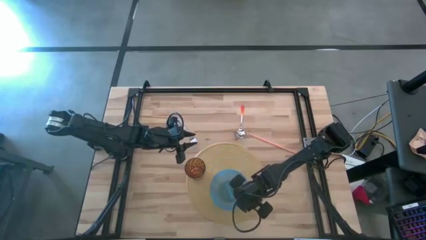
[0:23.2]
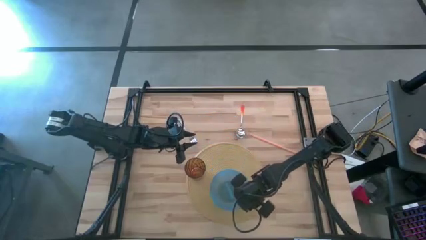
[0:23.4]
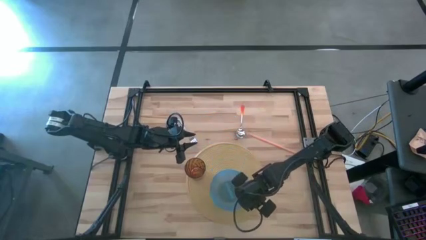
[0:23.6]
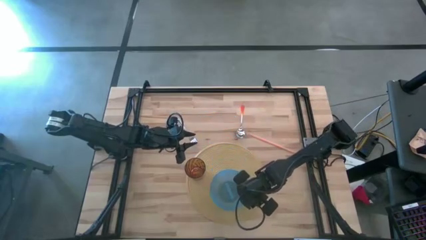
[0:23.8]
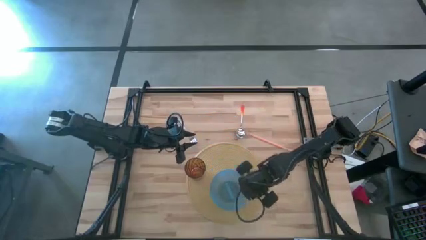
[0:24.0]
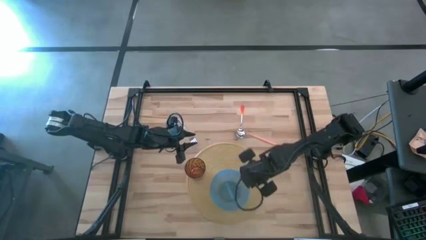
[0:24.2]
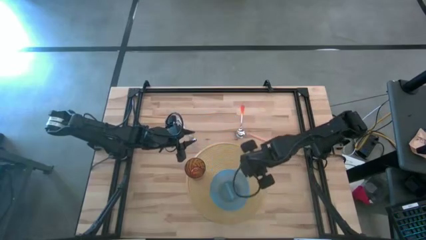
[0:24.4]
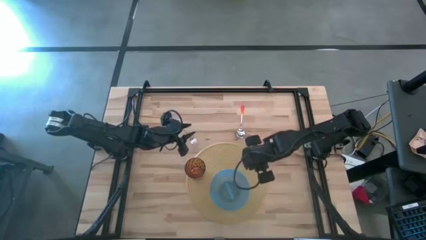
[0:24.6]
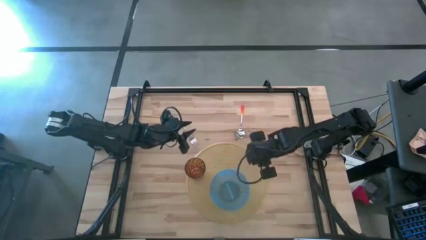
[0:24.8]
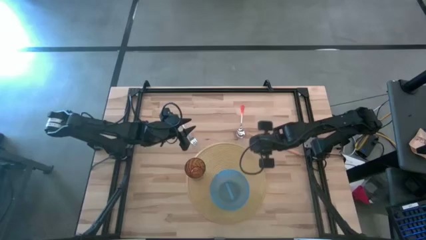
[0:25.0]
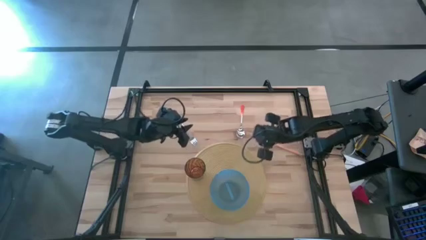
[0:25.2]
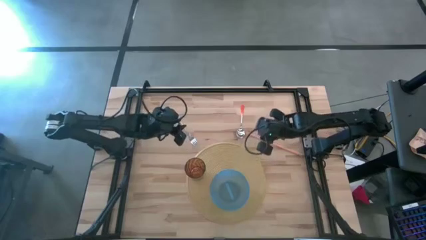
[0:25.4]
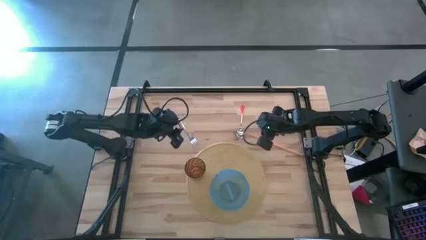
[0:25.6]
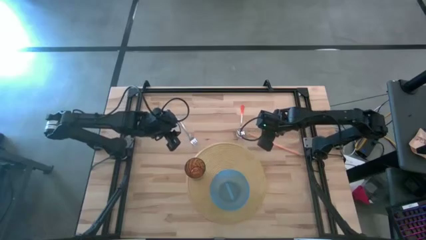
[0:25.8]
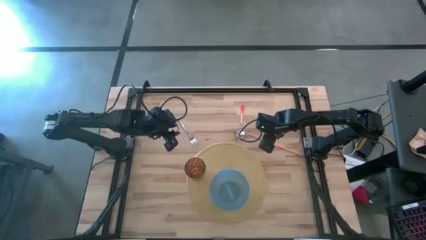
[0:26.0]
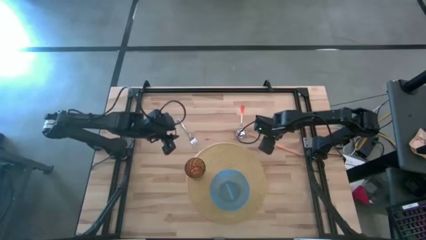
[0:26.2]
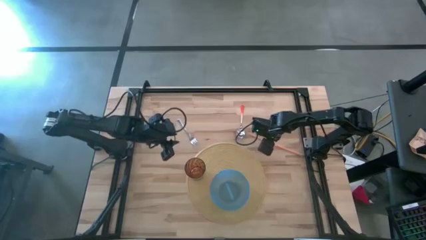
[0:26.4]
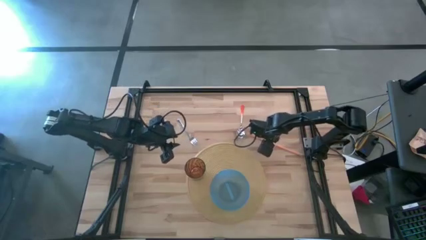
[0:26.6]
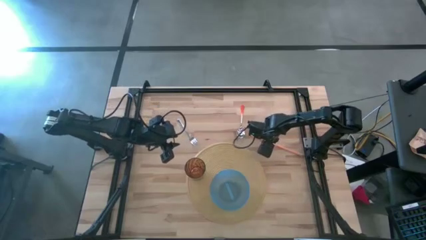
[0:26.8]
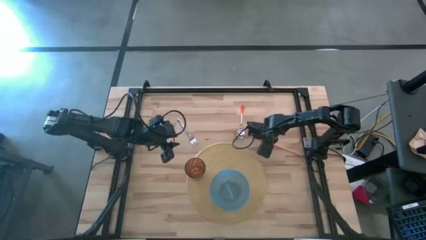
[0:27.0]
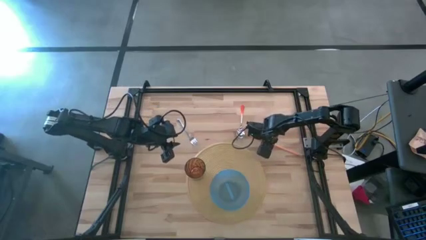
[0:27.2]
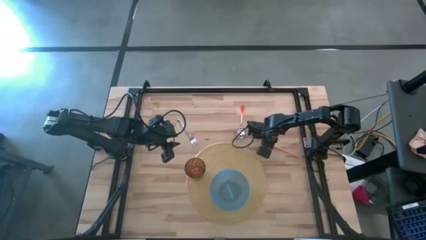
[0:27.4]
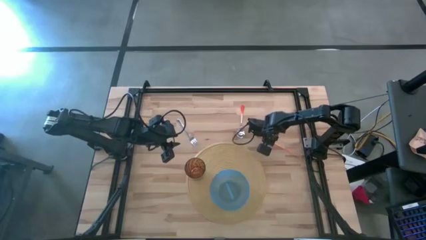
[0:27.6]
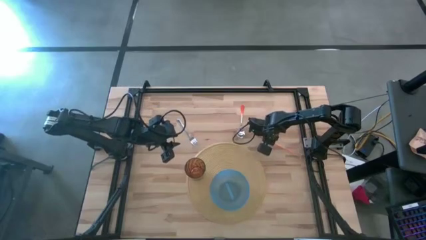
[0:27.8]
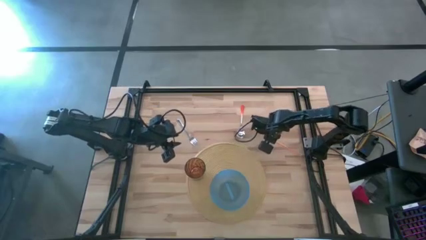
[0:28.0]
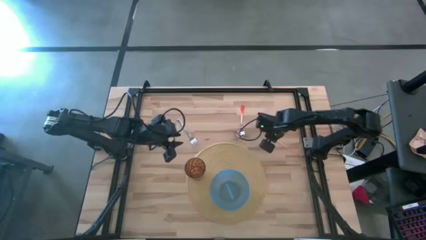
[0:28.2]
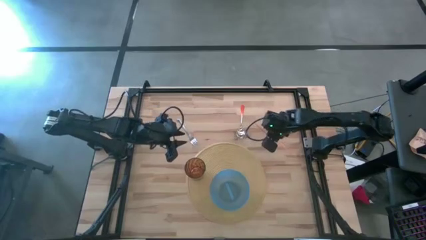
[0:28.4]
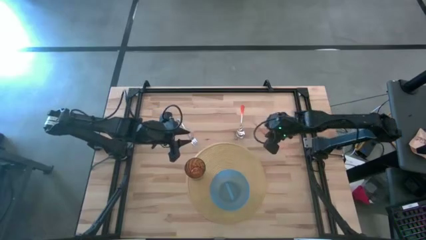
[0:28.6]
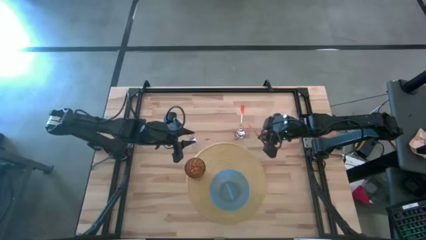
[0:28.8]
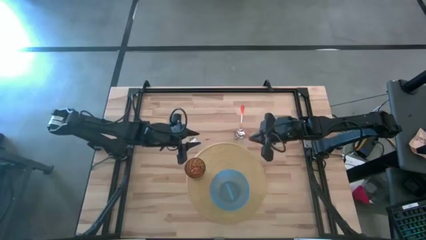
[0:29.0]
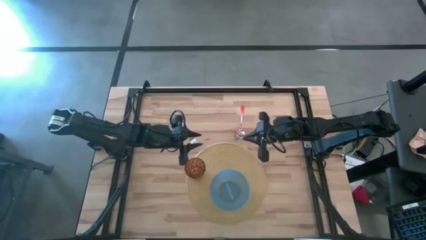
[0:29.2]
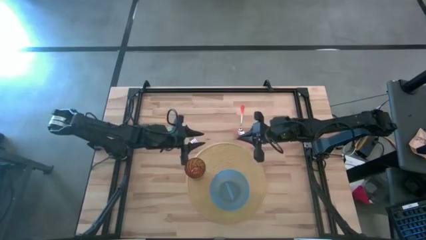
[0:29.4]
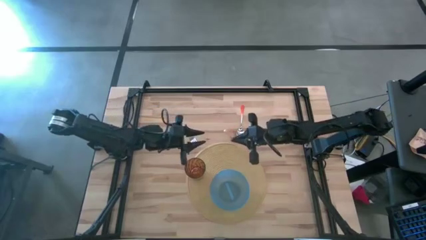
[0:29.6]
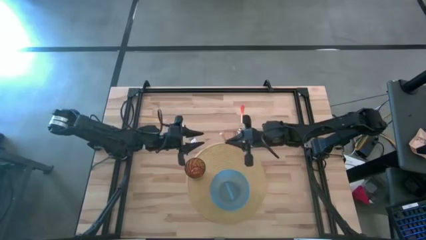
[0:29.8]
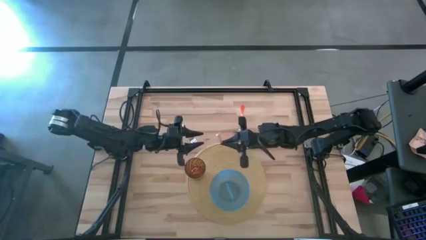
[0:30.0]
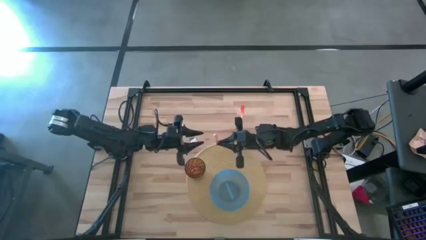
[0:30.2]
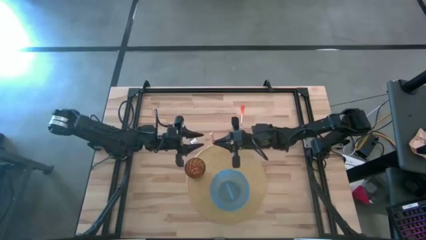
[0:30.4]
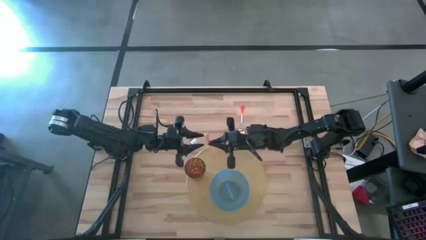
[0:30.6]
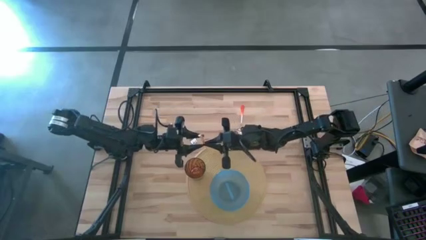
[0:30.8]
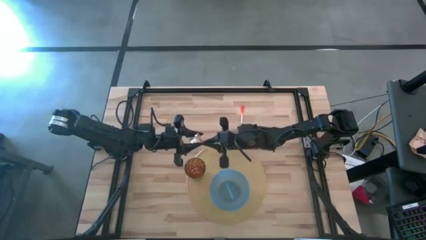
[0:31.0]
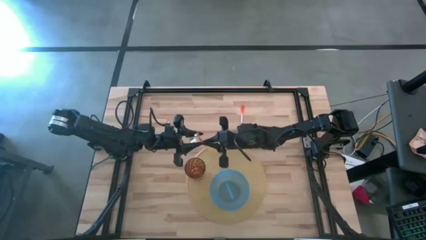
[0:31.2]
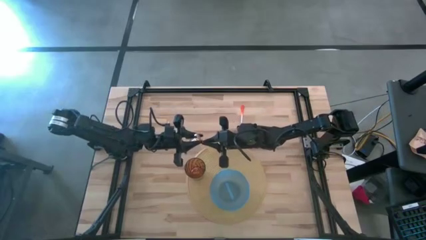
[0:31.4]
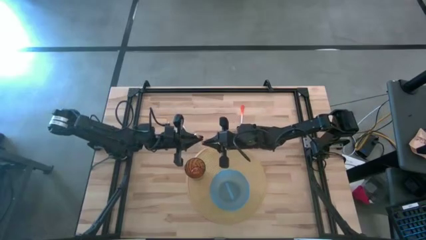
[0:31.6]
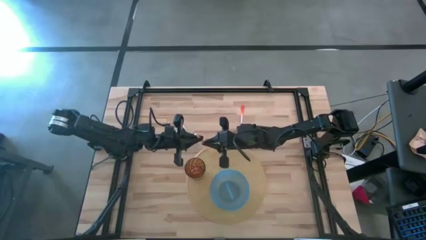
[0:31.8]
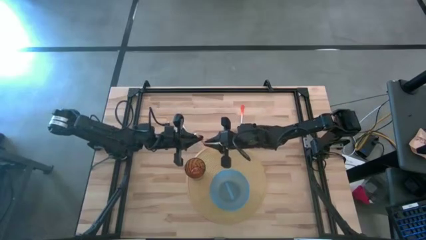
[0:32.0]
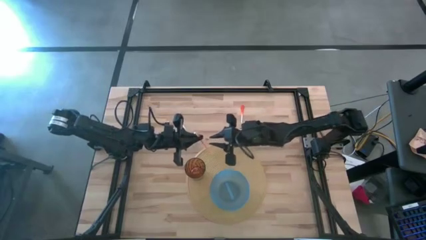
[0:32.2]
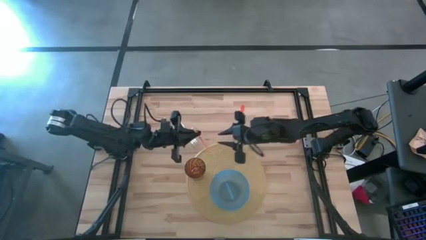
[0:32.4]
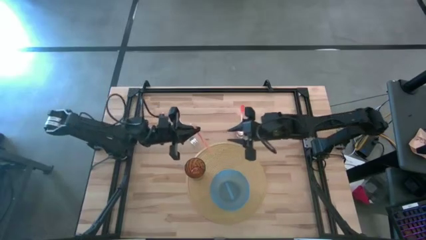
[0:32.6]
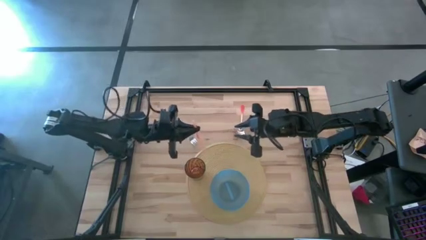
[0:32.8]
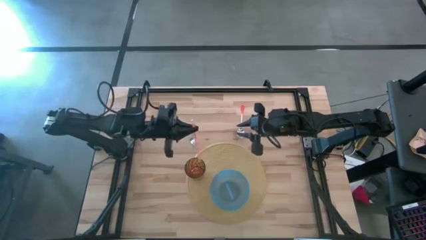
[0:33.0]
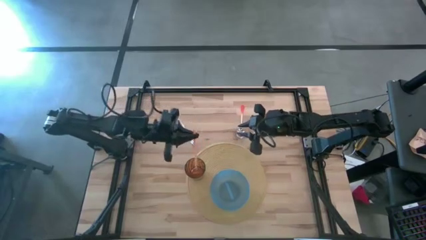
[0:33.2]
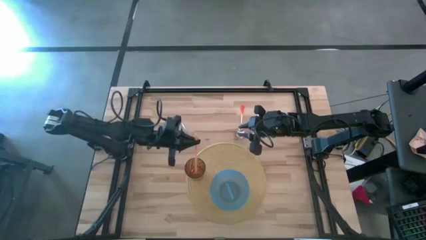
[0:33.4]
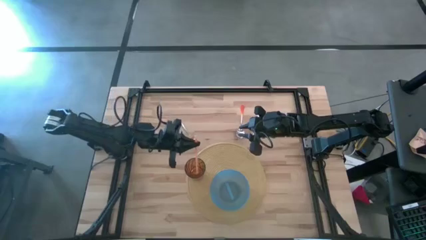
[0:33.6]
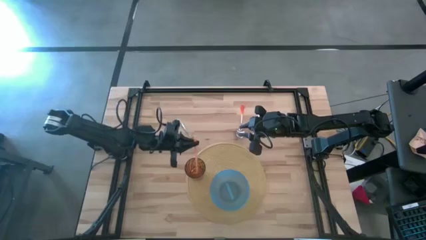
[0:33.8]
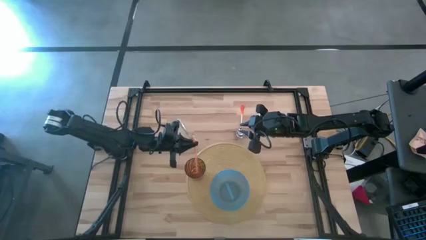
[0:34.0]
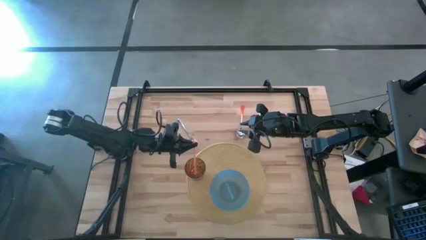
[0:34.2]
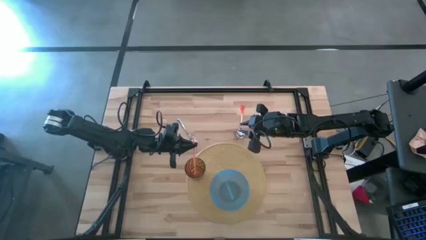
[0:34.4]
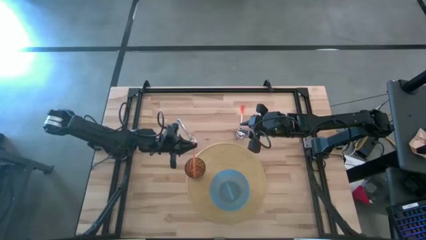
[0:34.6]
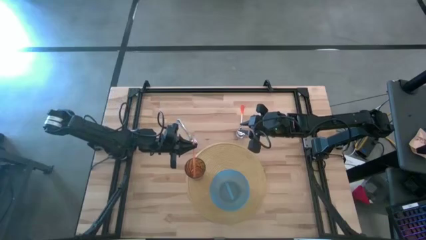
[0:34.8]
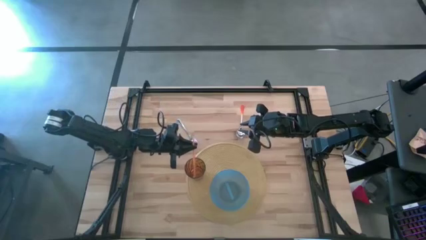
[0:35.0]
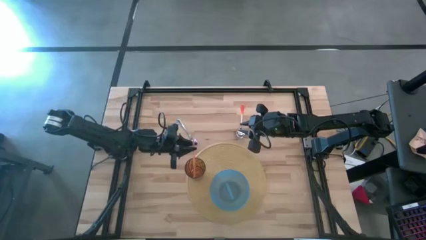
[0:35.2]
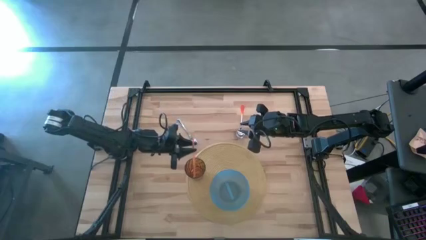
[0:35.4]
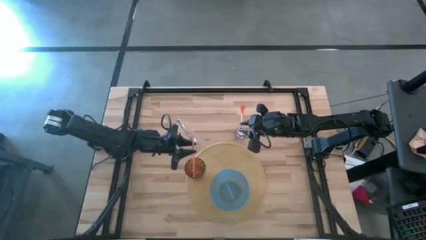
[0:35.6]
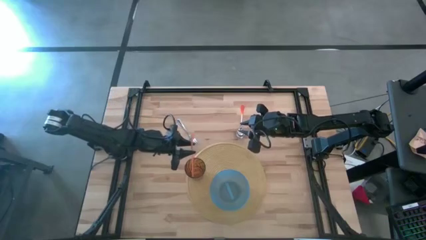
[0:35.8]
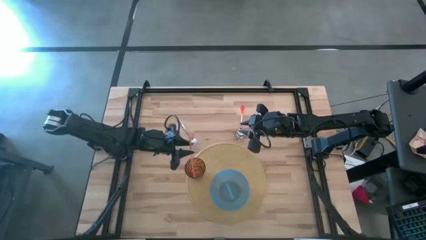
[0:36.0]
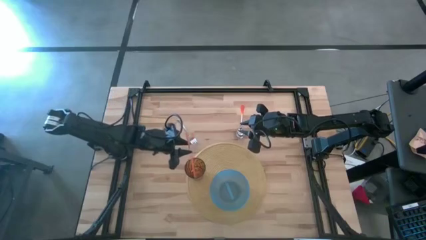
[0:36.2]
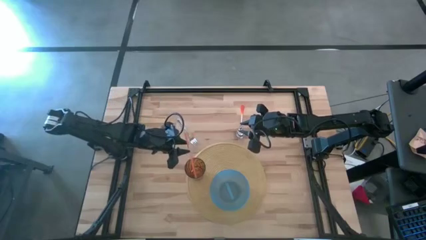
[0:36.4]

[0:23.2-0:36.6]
Task: Pick & Place Utensil
Put the orange drinking straw into the orange cup on the brown mat
